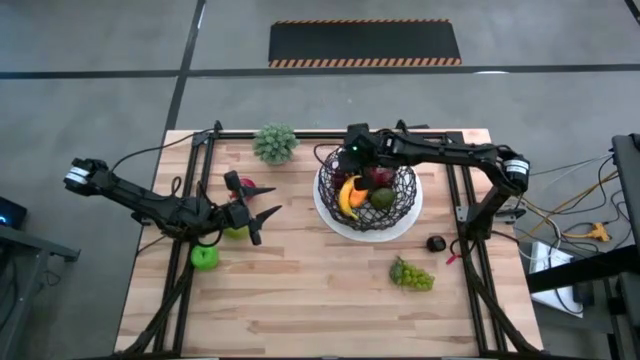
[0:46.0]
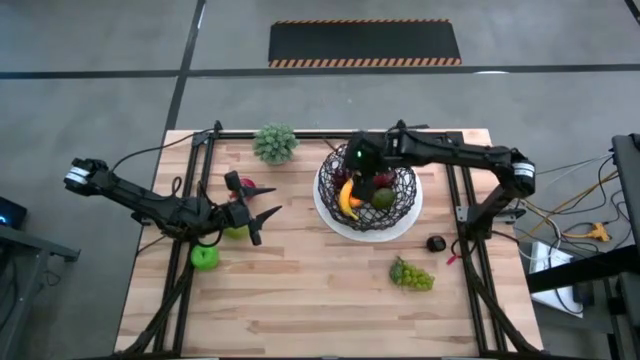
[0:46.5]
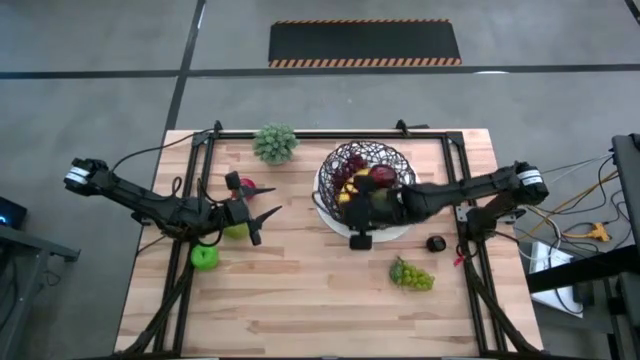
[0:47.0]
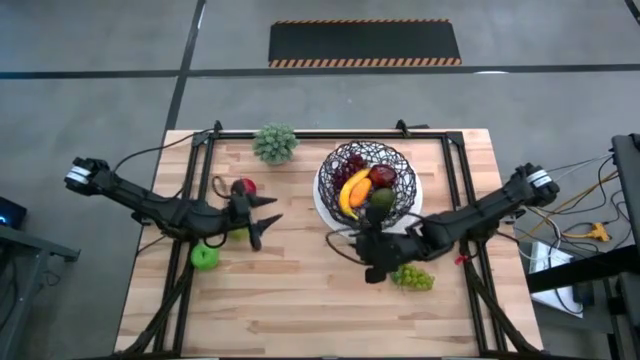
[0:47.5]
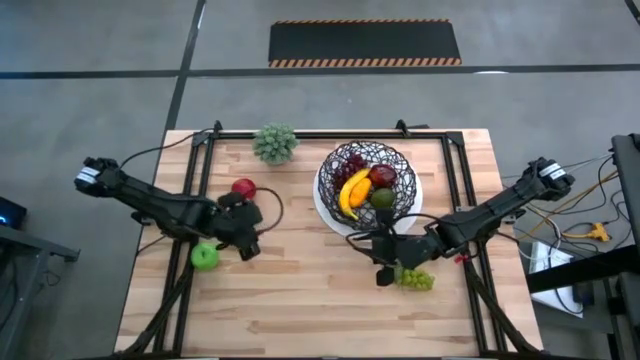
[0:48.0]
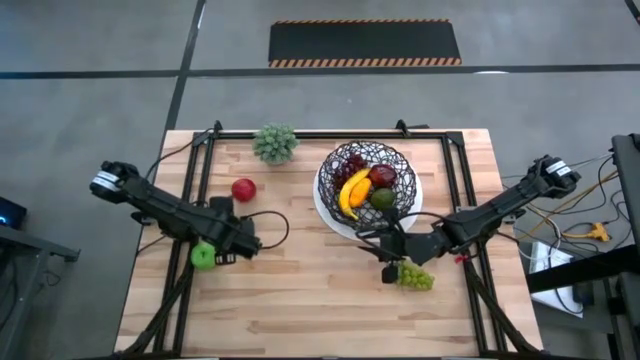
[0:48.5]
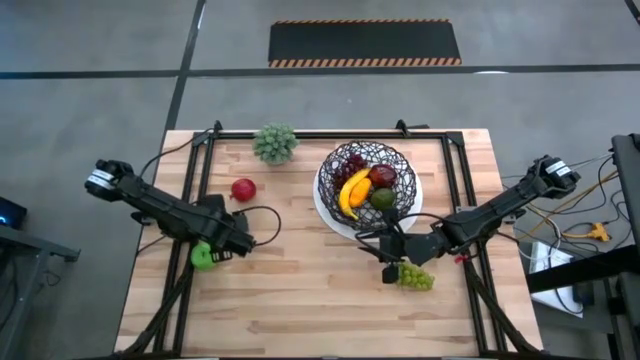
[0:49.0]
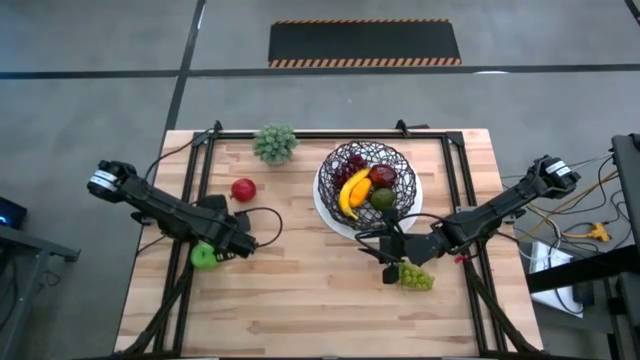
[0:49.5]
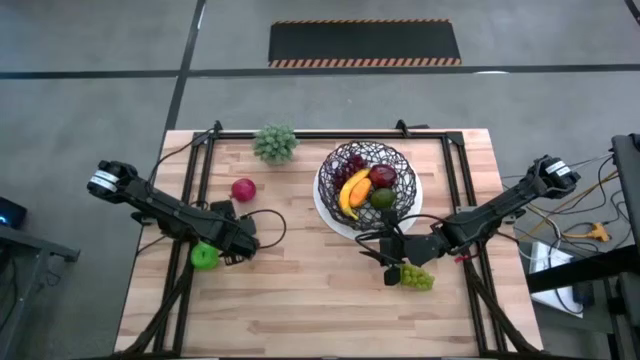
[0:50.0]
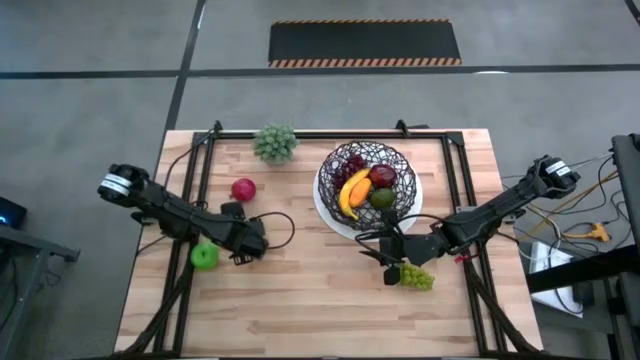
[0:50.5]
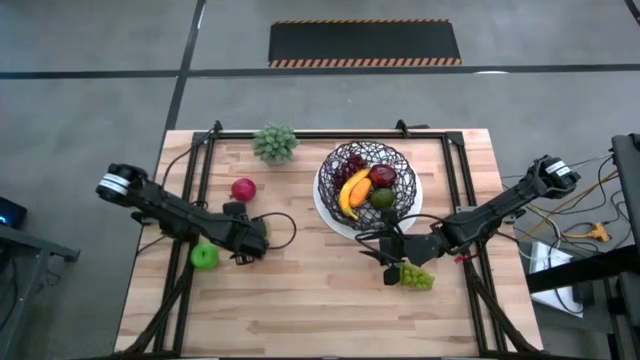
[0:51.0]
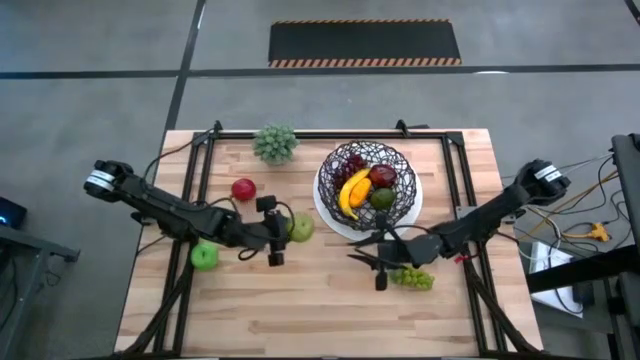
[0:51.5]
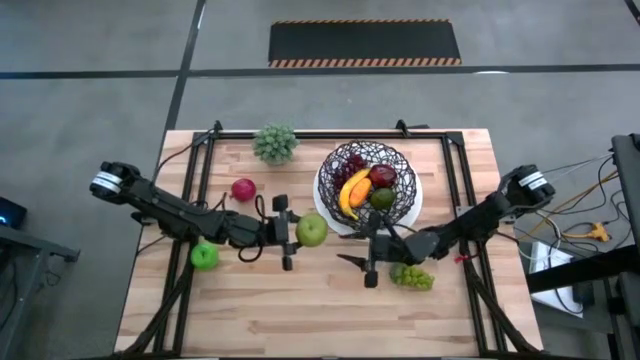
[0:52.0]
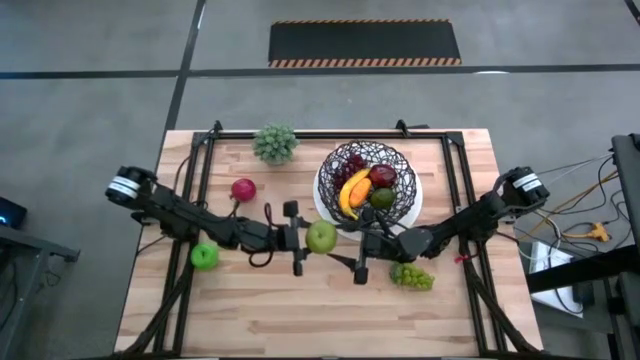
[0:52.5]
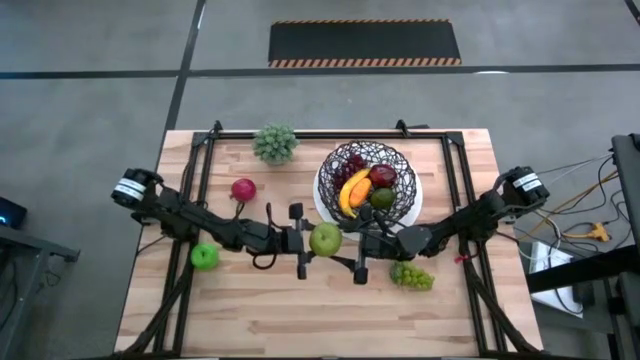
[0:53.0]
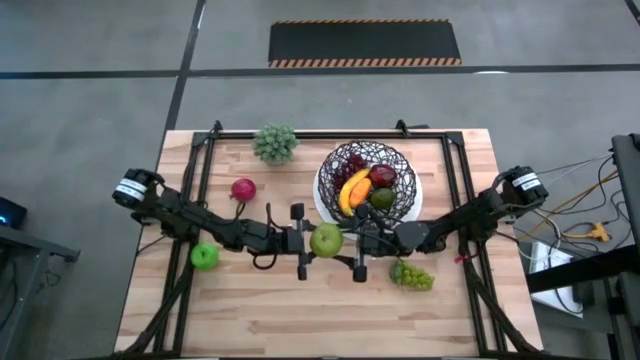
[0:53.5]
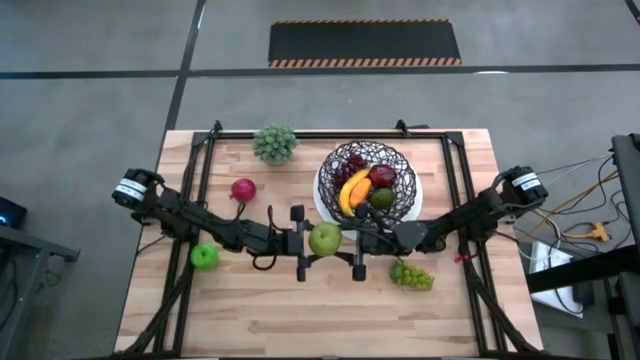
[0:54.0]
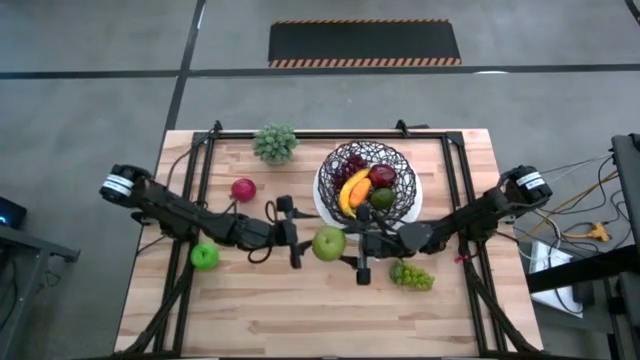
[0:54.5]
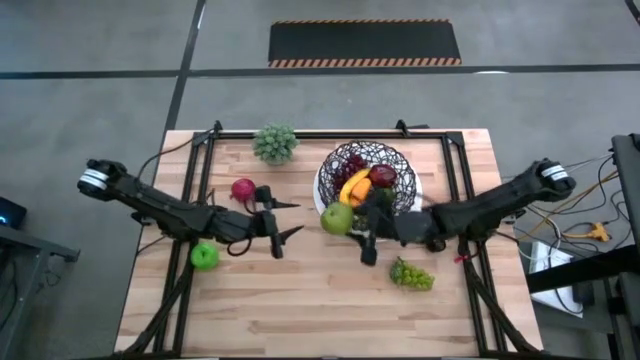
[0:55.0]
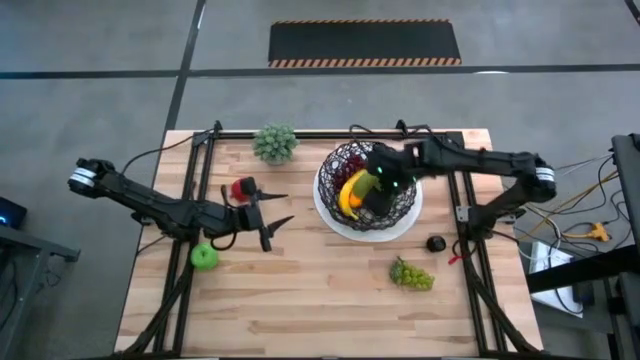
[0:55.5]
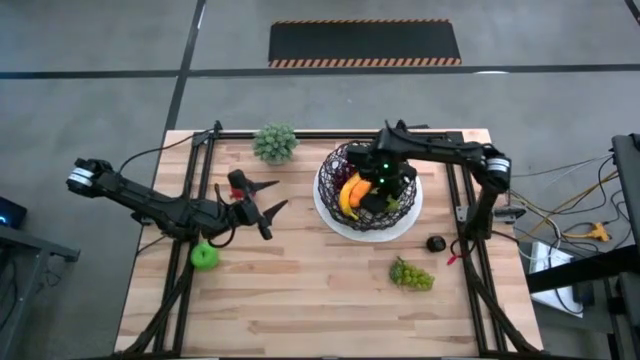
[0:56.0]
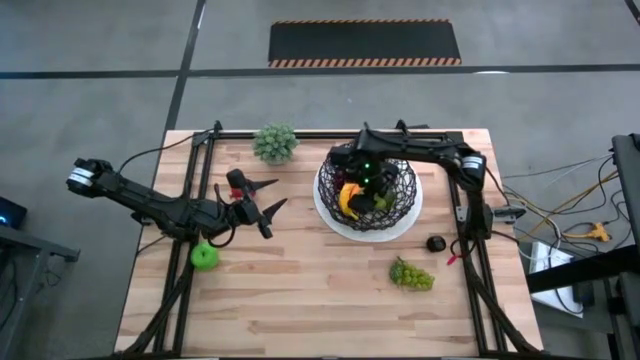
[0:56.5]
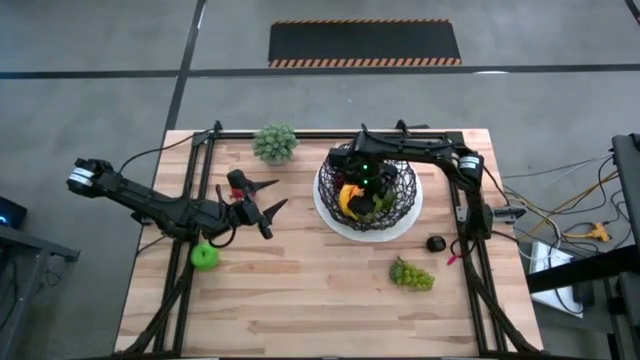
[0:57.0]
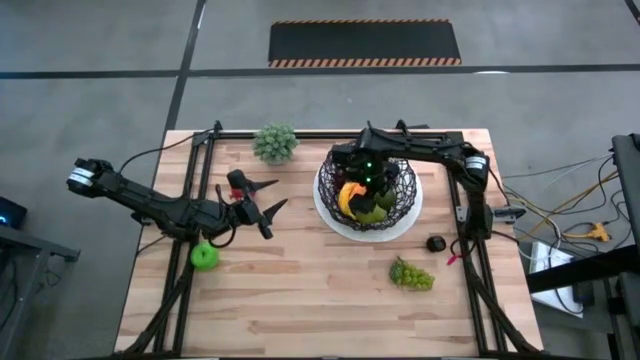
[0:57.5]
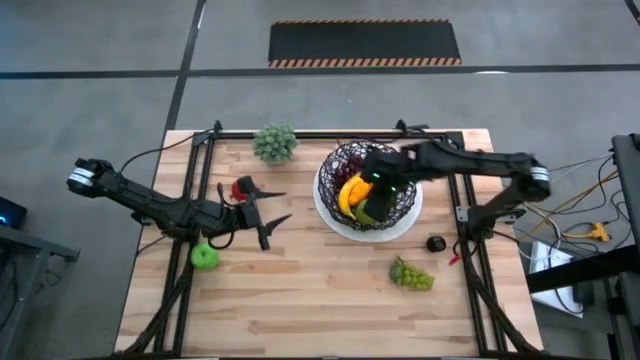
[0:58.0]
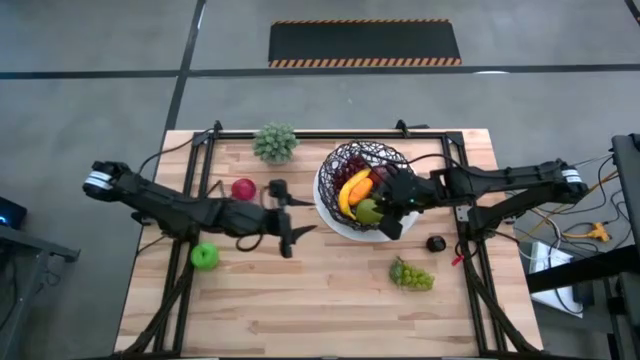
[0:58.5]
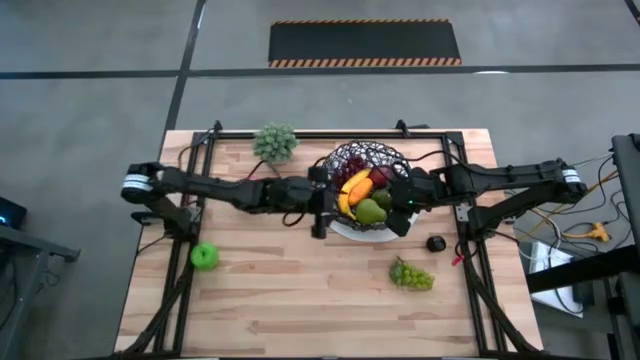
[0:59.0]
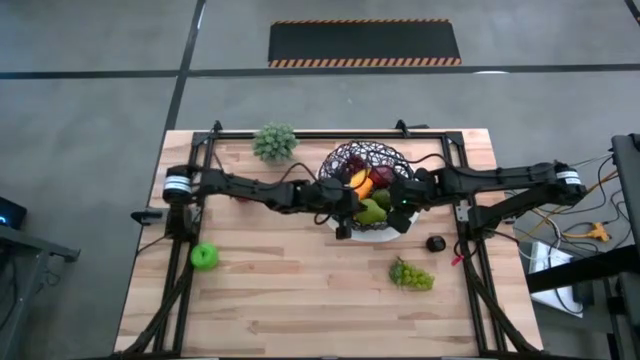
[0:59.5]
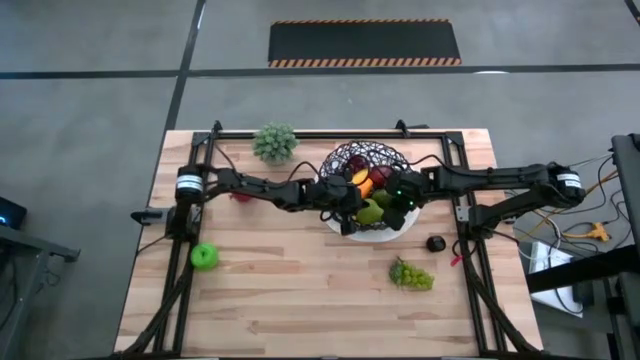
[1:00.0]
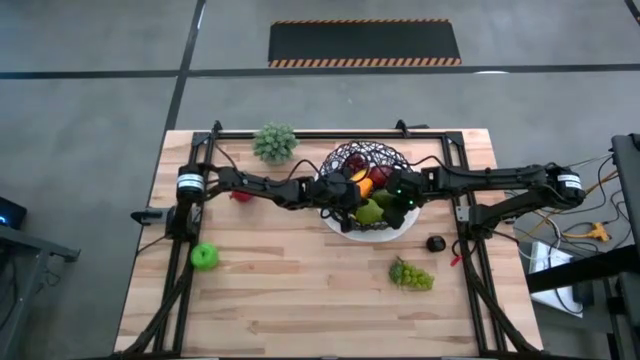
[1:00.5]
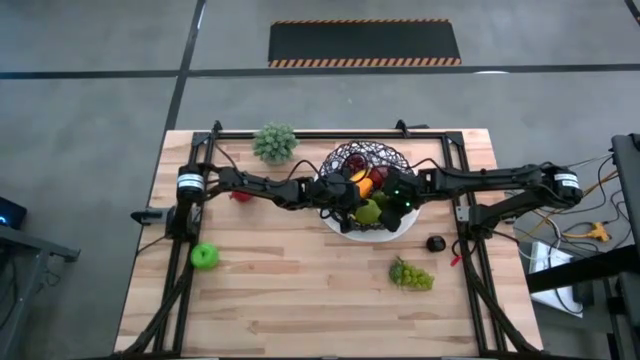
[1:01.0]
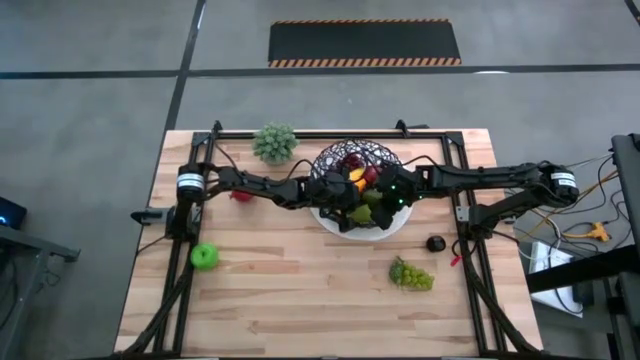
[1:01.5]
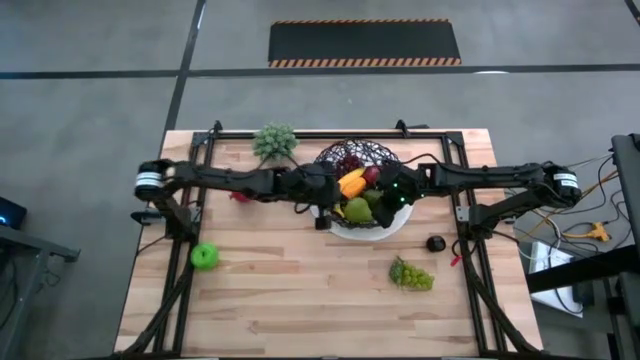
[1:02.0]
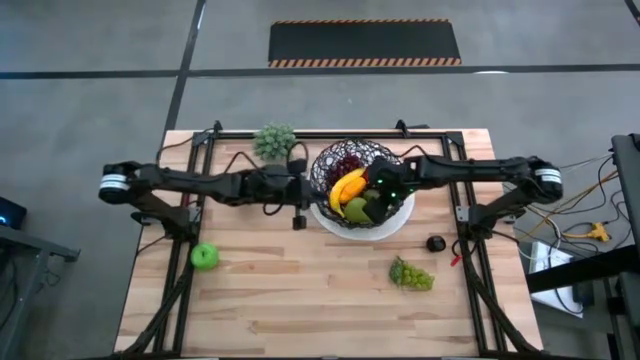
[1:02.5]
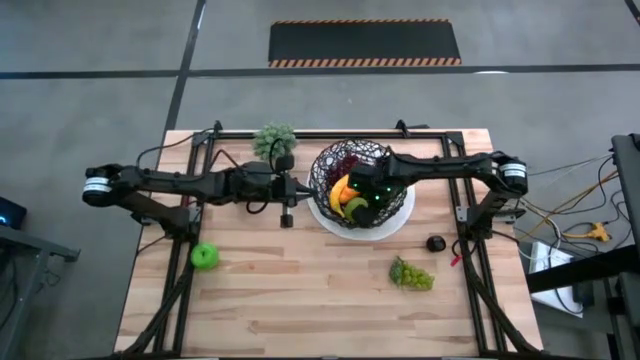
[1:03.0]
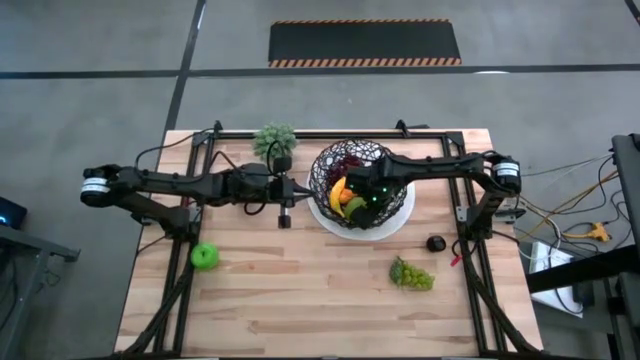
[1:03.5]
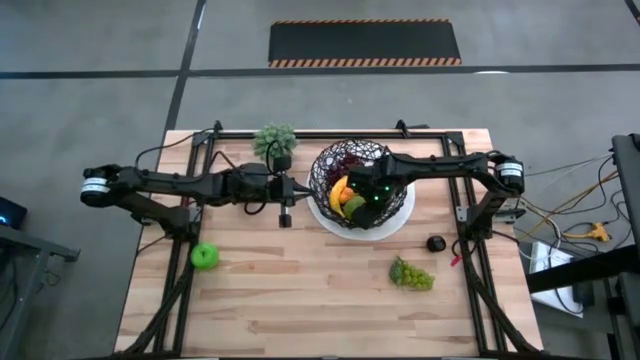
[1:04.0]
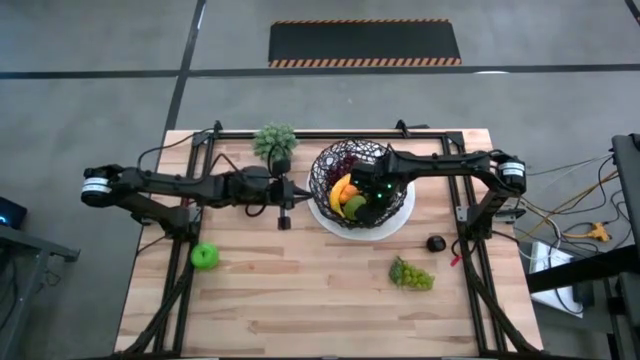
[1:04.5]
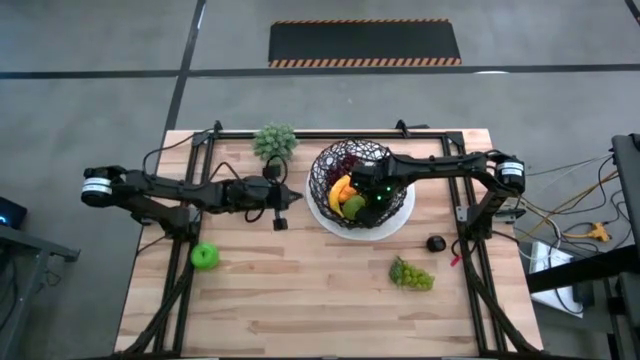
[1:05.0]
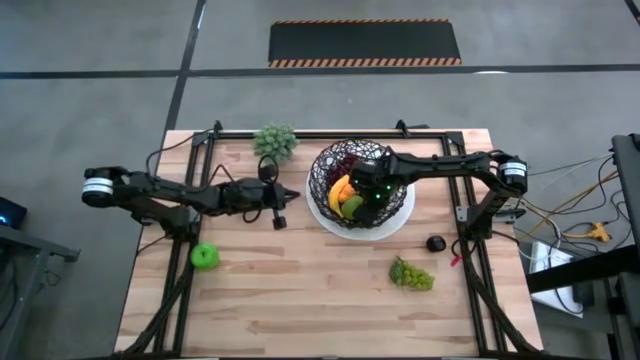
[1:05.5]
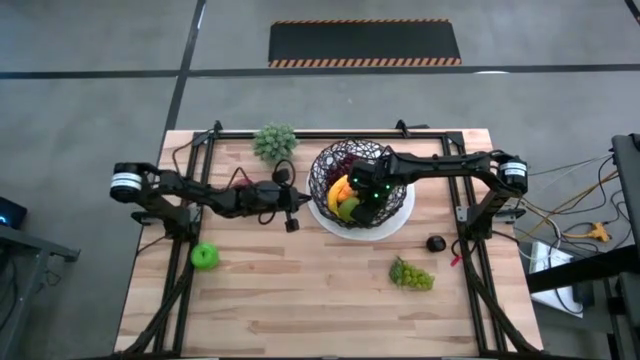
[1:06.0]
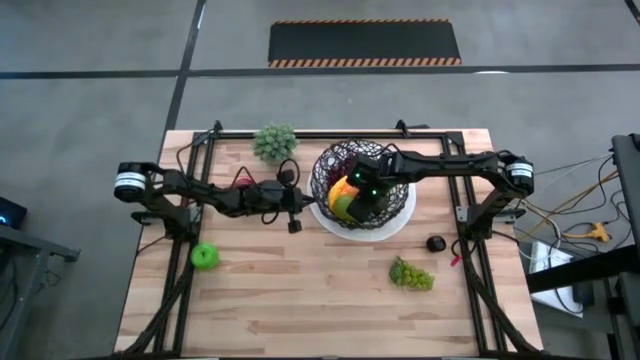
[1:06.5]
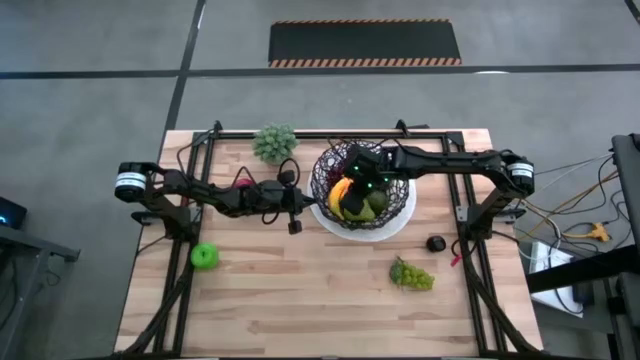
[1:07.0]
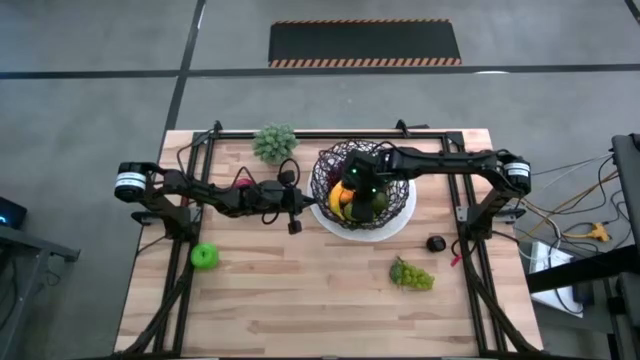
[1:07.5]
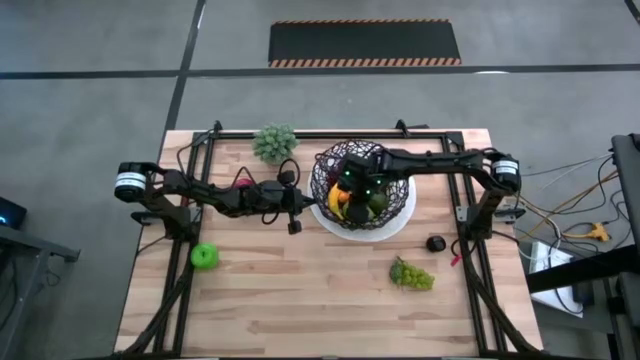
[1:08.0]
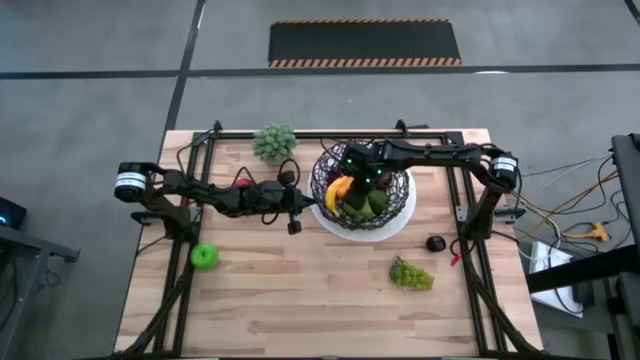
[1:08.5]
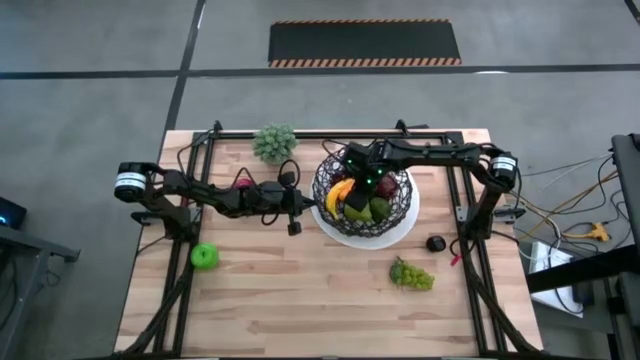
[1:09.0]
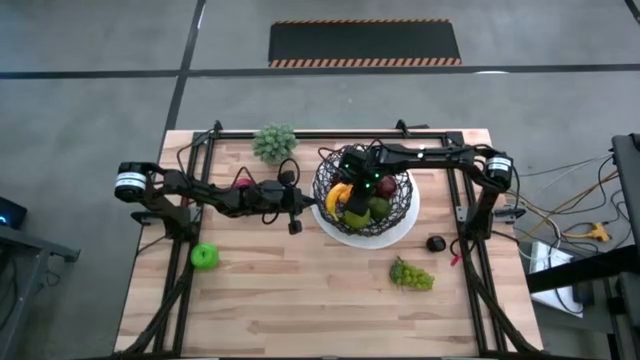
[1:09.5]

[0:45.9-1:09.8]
Task: Build produce basket
Put the green pear into the black wire basket
